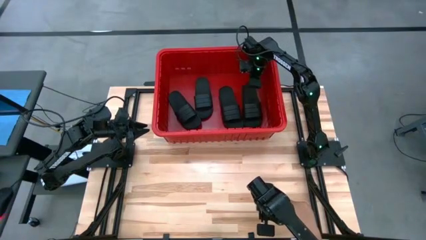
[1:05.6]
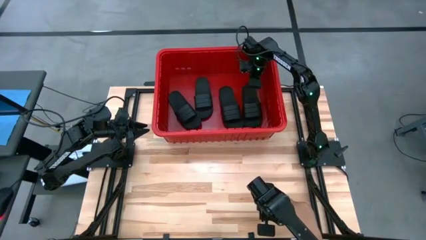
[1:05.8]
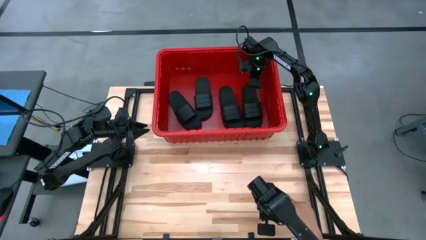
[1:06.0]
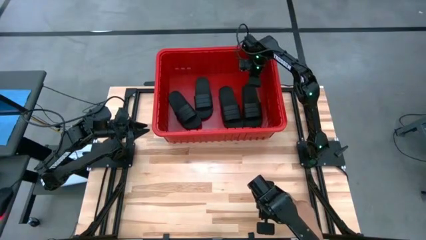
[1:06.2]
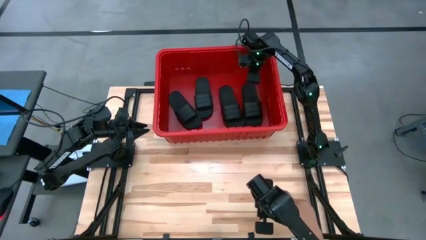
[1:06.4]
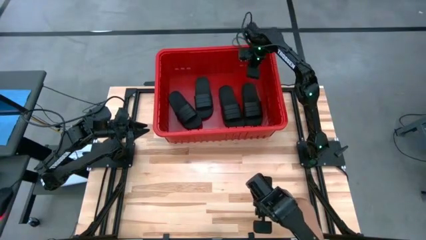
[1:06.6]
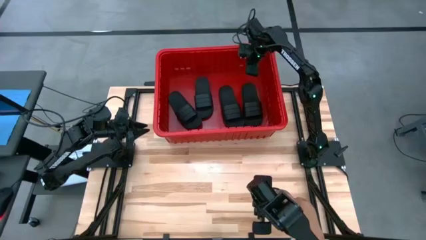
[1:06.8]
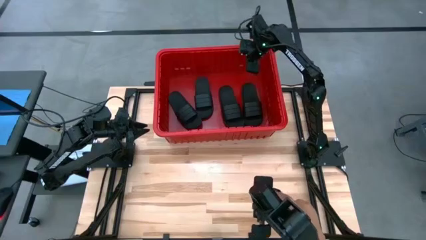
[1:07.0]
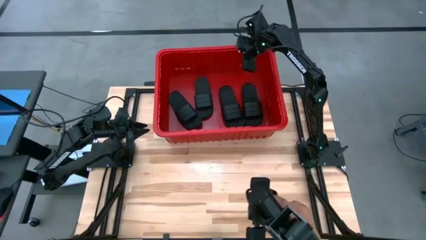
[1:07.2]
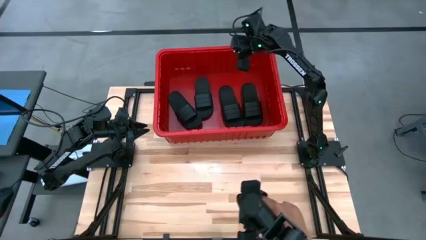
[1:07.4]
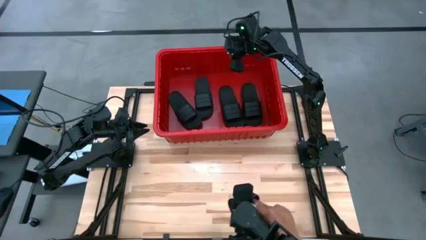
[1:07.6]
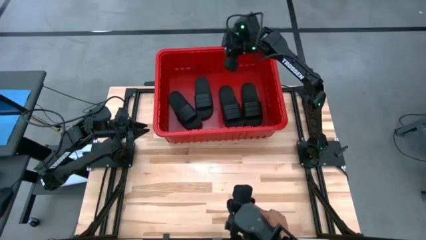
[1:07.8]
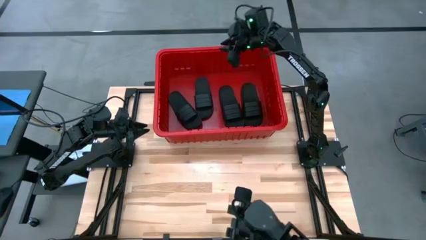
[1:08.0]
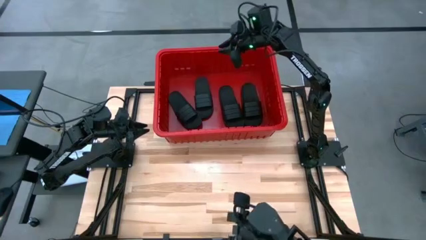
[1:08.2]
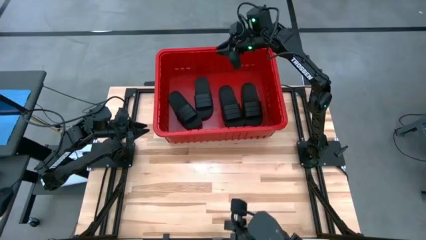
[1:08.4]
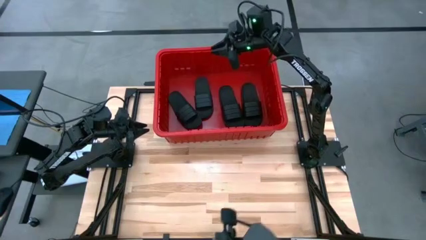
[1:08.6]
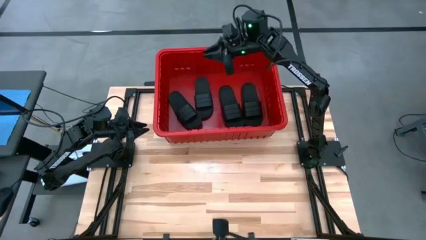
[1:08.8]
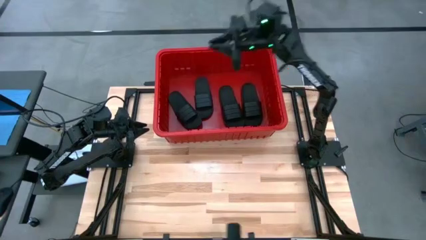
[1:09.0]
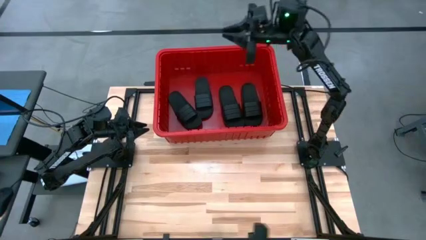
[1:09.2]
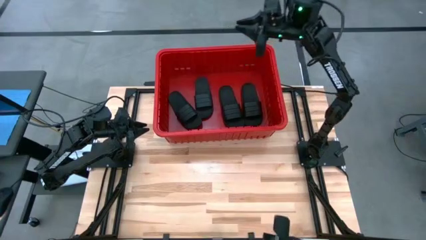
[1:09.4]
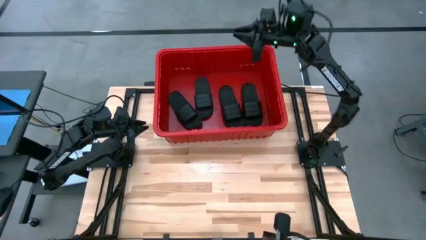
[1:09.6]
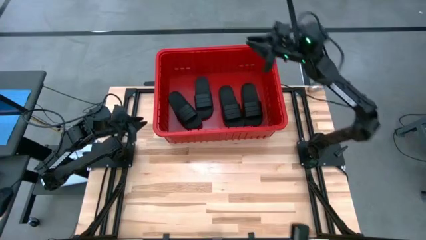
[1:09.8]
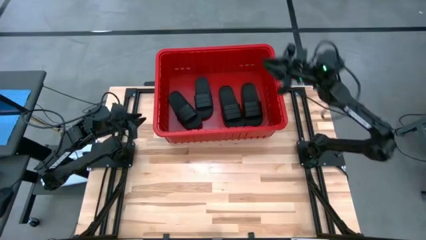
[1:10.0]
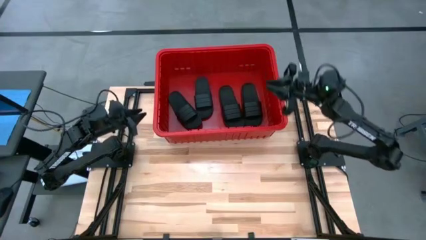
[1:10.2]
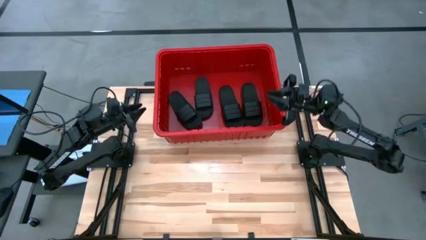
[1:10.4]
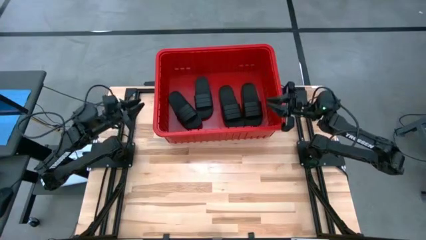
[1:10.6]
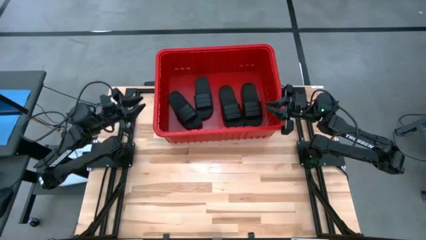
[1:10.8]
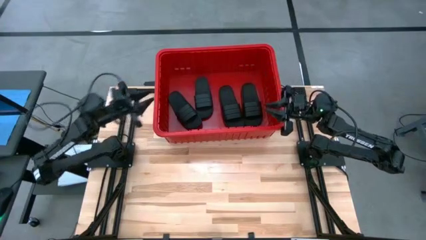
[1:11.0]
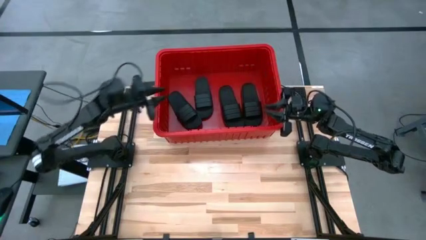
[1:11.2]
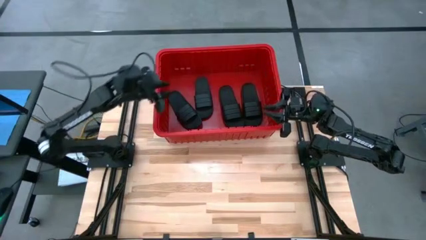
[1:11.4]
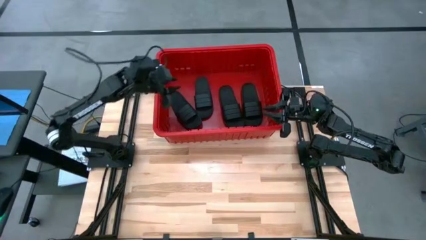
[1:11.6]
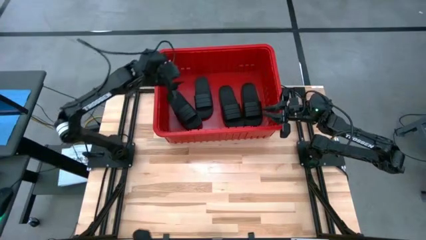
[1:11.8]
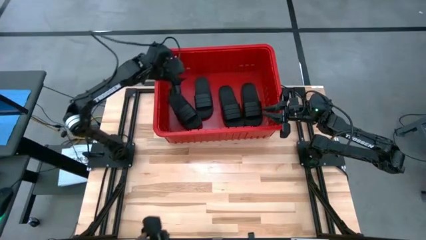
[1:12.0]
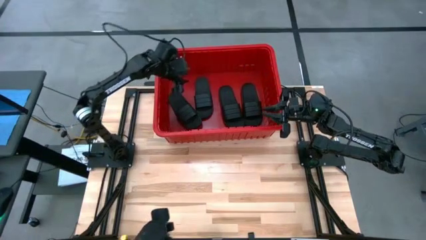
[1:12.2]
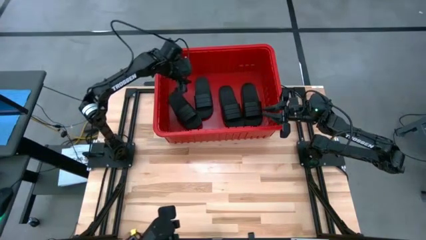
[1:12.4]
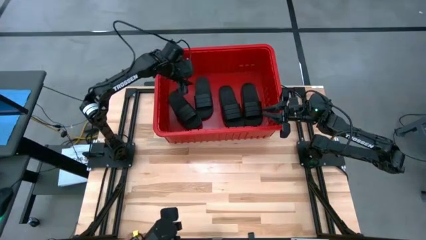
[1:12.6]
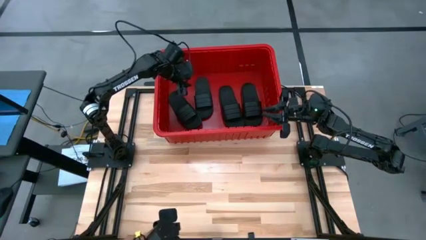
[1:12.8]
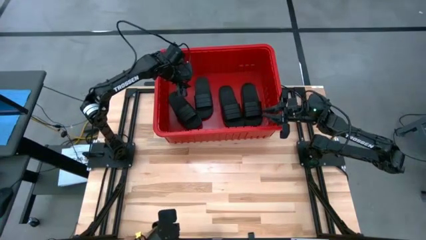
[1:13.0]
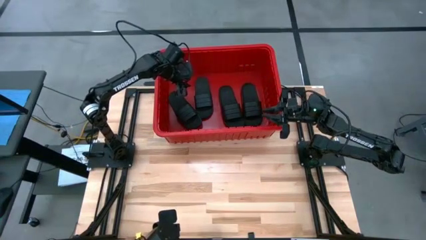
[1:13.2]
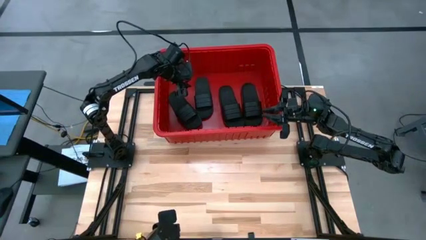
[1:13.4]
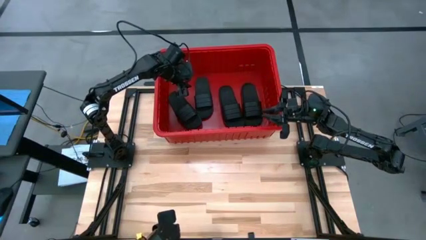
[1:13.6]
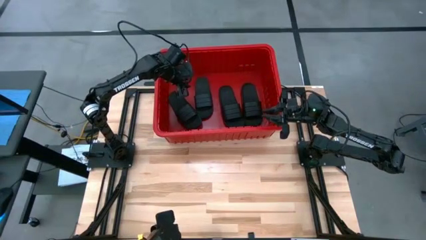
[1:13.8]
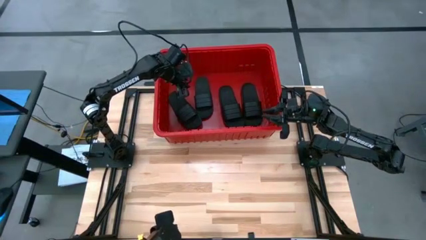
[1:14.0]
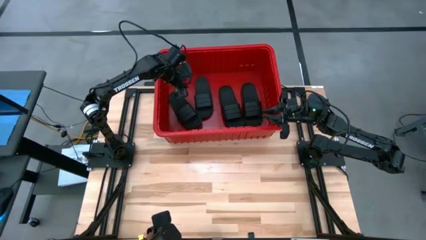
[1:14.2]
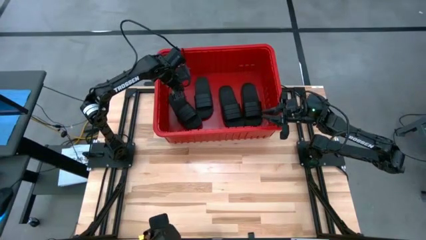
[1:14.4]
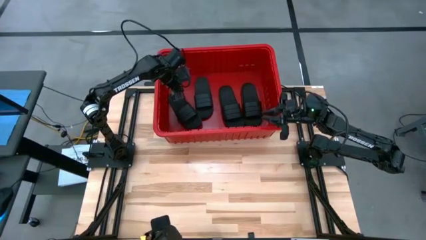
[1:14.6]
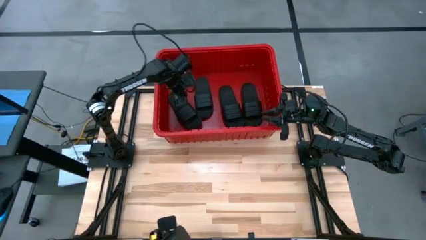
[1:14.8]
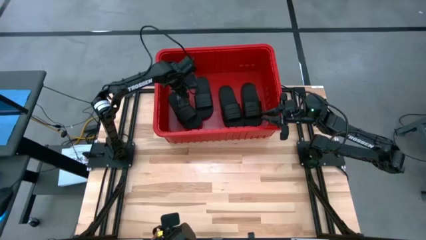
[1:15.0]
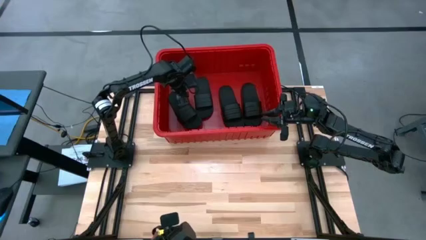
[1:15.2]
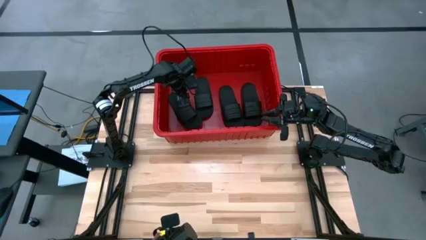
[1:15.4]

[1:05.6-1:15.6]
Task: Pick and place slides into bin
Adjust the black slides in the red container
